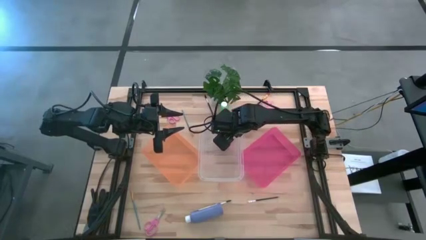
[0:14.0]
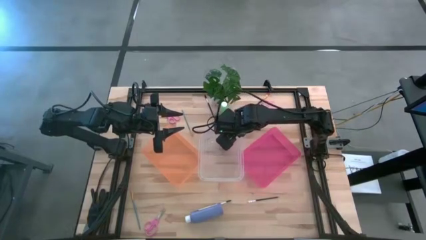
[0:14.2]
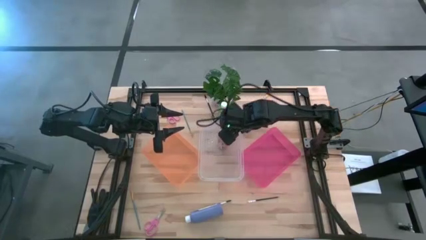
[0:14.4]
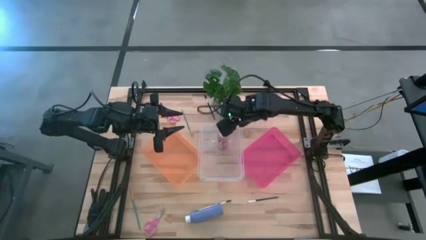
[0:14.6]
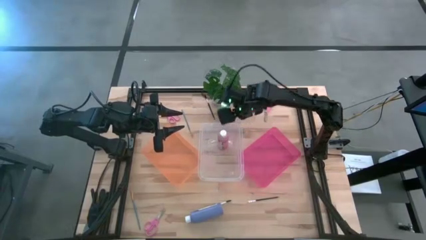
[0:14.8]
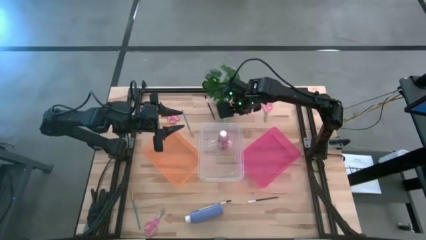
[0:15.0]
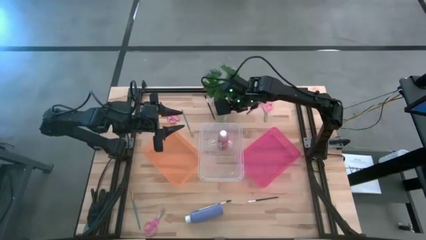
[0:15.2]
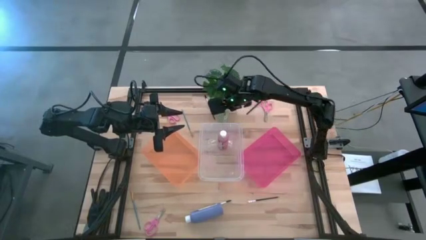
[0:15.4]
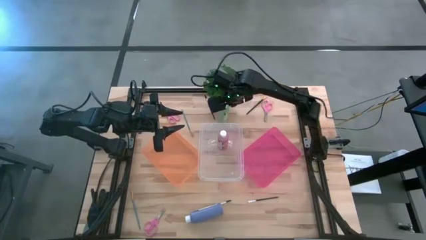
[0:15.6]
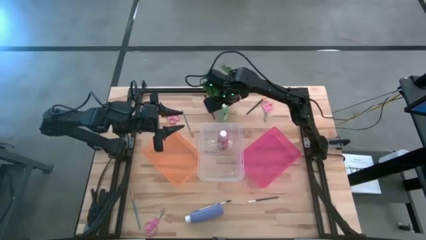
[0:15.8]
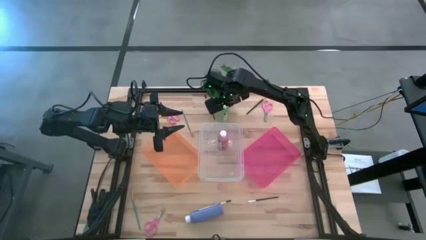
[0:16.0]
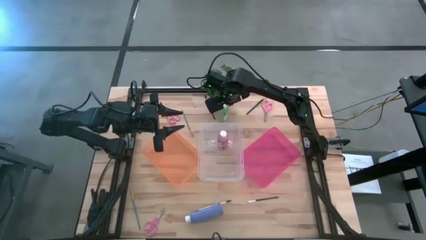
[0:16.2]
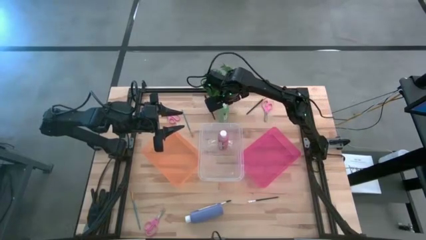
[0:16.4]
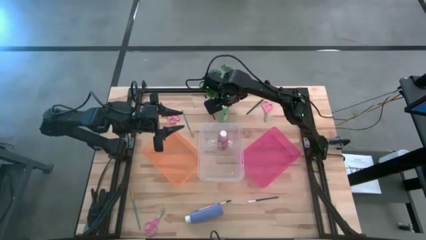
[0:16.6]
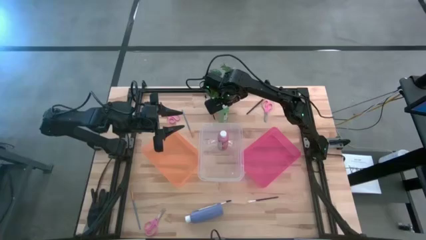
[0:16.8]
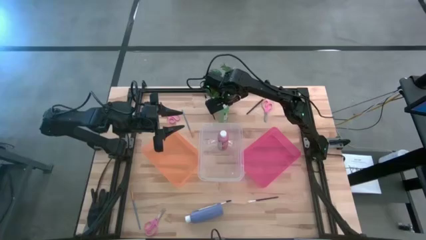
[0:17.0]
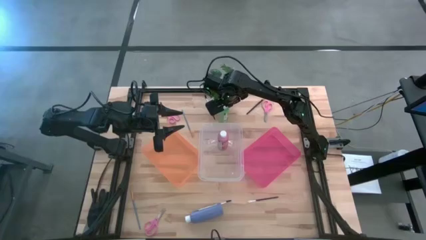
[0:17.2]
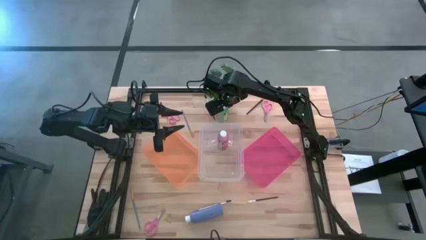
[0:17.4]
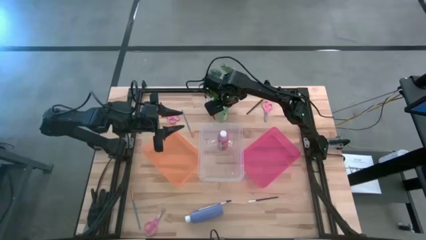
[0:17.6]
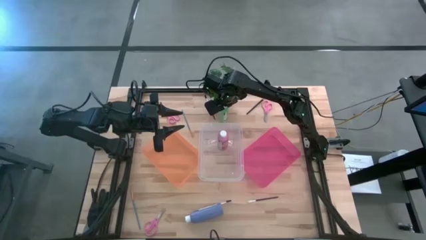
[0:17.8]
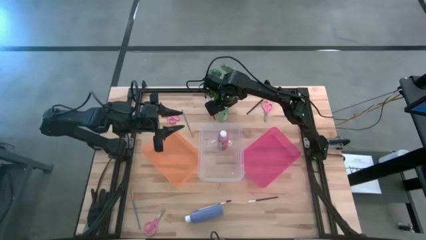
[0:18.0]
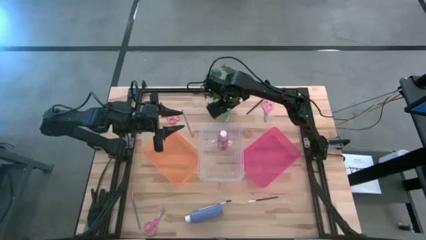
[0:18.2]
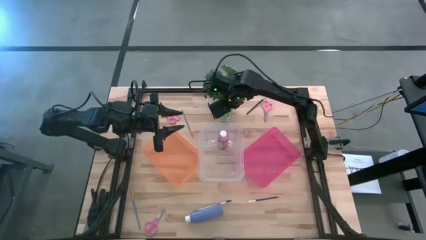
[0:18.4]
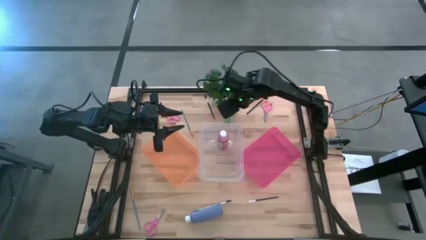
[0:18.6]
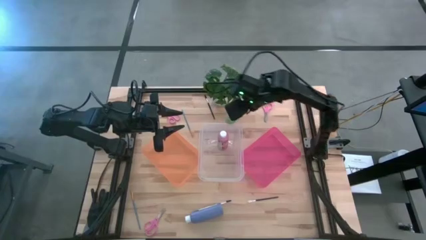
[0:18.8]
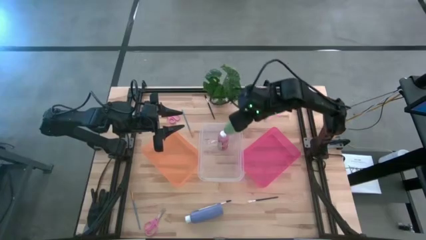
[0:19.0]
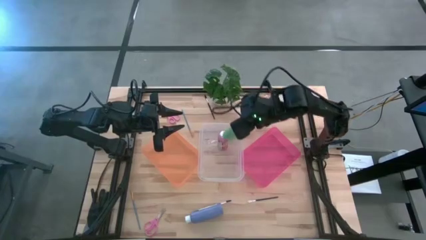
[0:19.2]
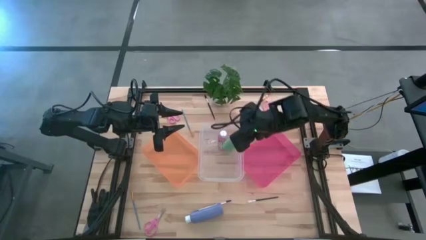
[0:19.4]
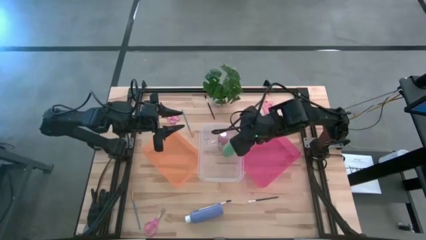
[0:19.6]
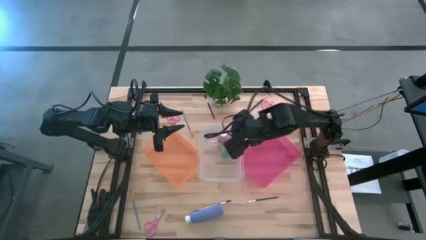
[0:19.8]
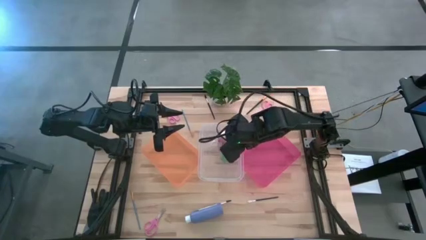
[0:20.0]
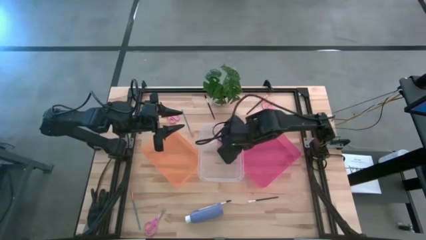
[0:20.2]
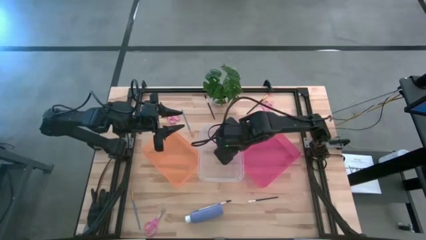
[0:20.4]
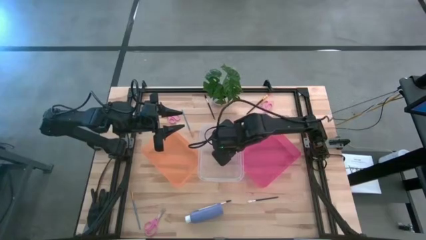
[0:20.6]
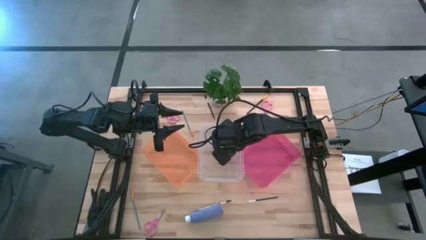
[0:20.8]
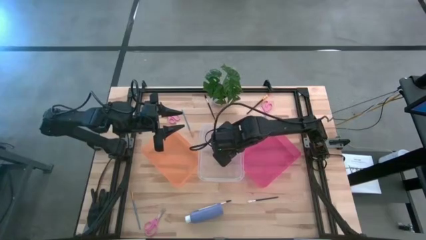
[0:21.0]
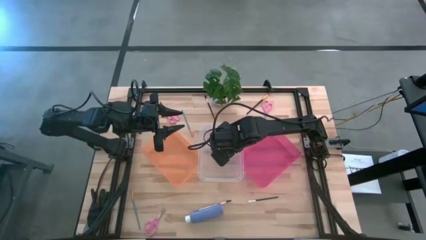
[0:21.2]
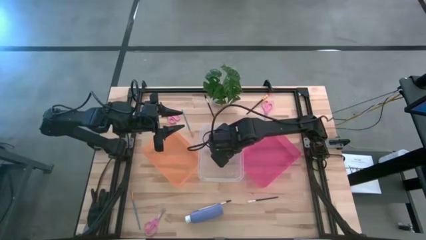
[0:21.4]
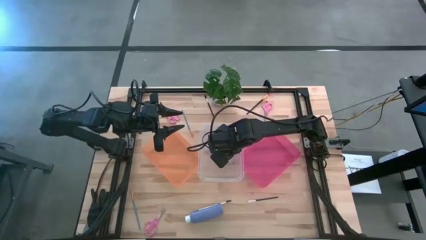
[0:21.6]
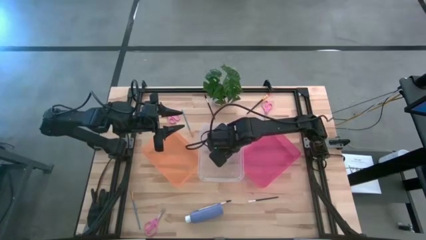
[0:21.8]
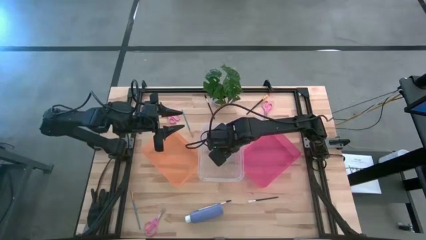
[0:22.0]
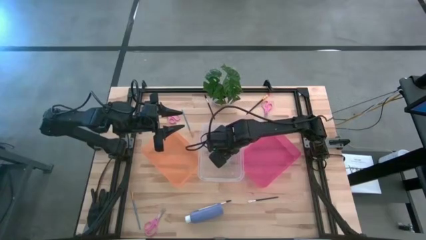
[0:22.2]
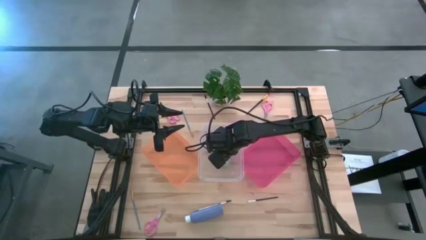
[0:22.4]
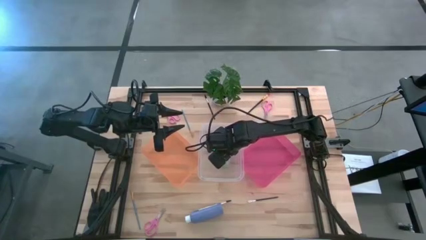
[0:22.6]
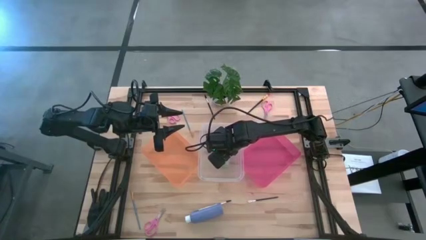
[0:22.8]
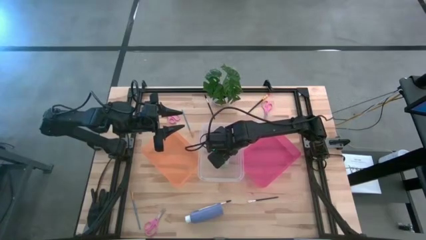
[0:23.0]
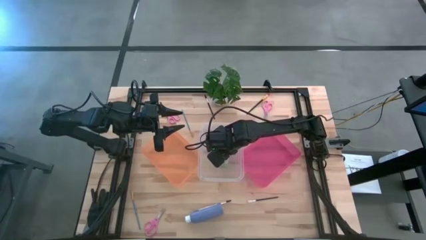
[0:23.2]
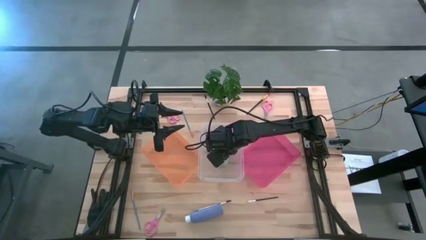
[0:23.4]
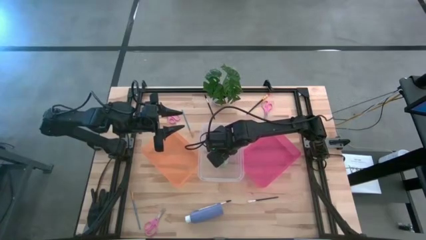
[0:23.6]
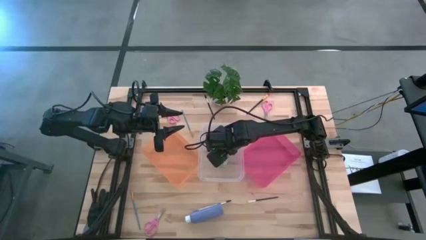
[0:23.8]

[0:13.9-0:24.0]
Task: Pick & Place Paint Supplies
Put the green paint bottle into the transparent bin

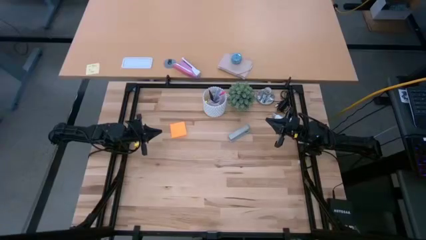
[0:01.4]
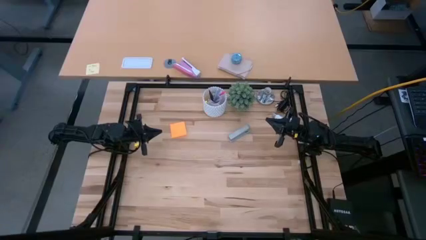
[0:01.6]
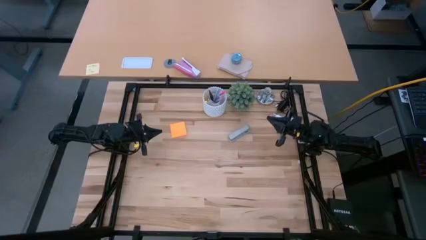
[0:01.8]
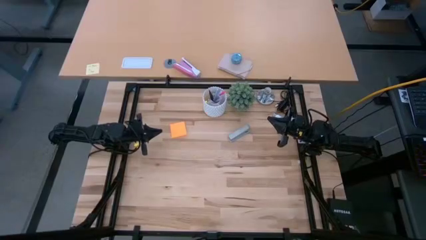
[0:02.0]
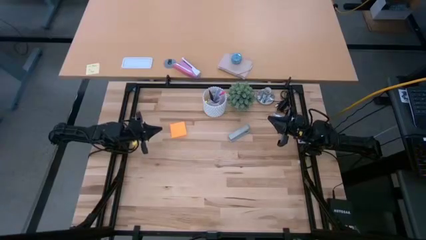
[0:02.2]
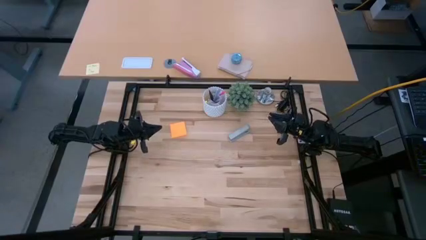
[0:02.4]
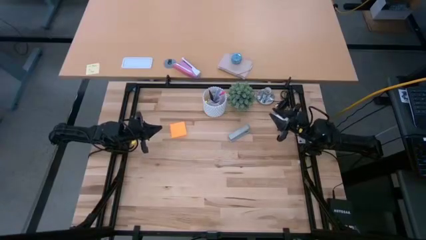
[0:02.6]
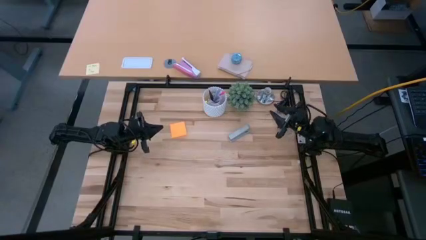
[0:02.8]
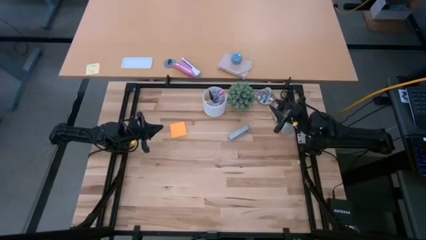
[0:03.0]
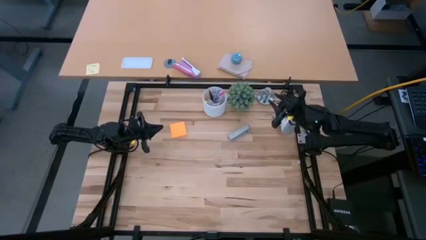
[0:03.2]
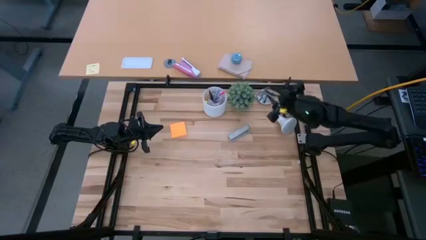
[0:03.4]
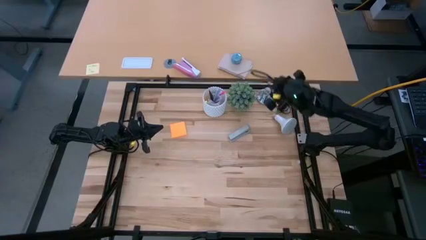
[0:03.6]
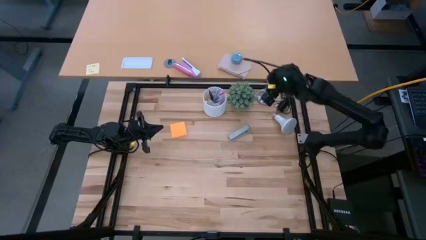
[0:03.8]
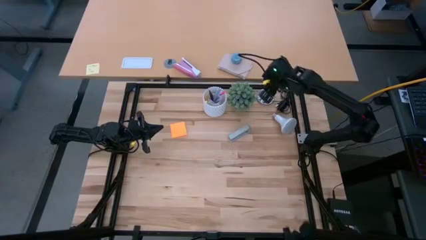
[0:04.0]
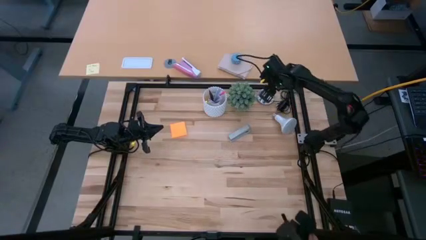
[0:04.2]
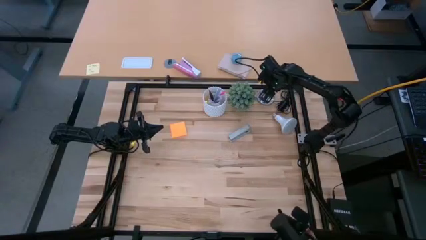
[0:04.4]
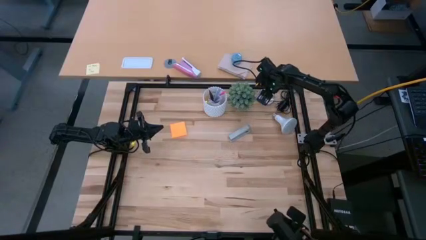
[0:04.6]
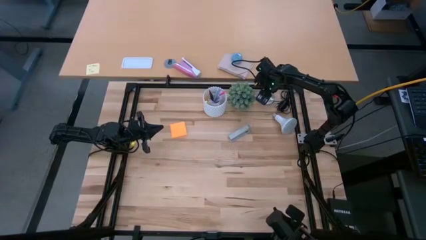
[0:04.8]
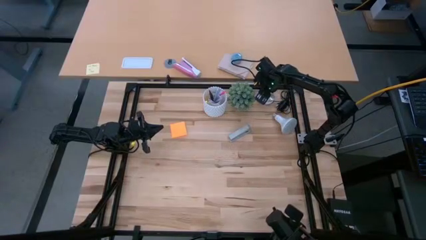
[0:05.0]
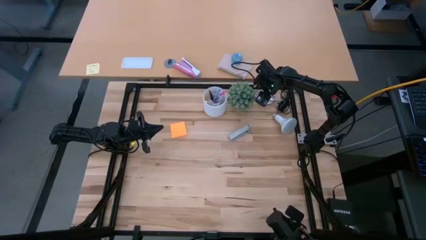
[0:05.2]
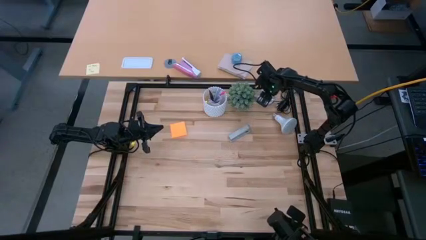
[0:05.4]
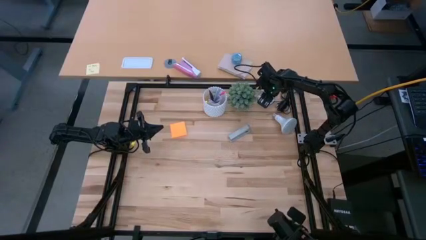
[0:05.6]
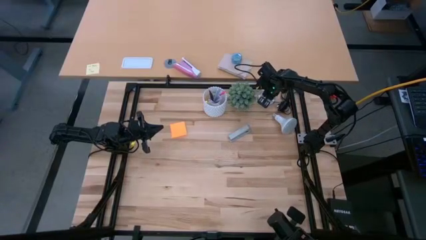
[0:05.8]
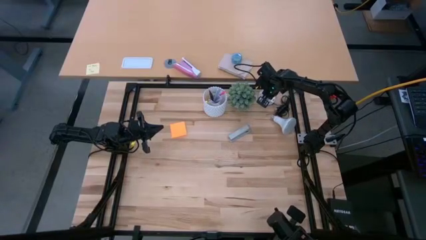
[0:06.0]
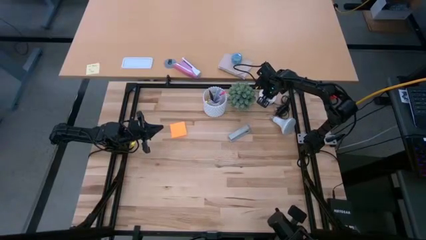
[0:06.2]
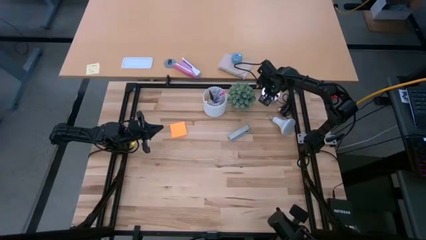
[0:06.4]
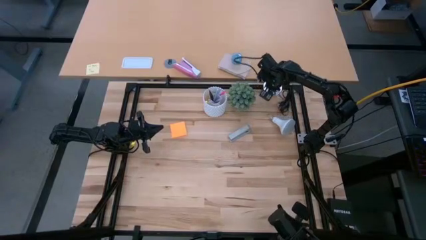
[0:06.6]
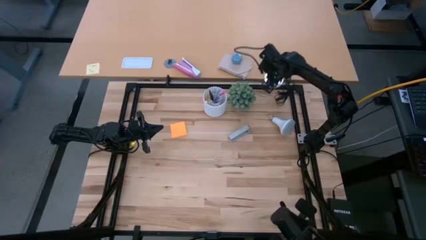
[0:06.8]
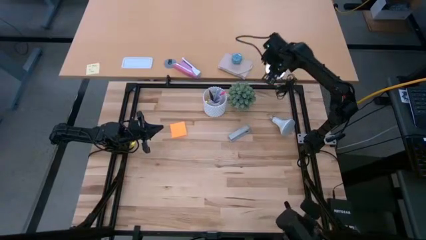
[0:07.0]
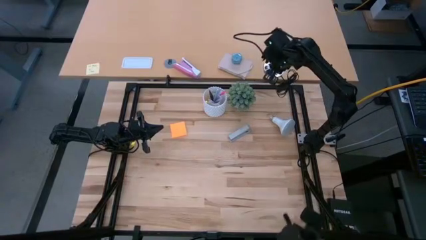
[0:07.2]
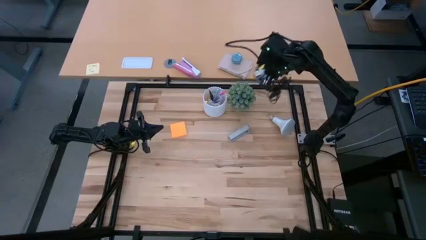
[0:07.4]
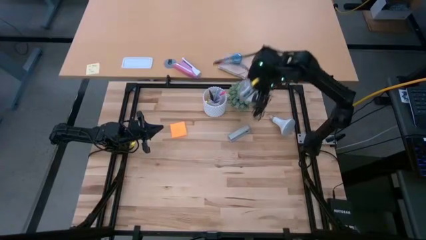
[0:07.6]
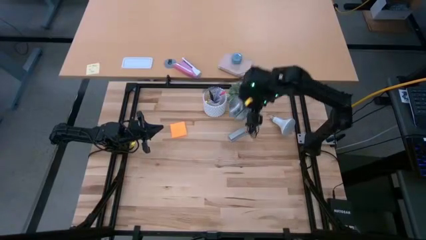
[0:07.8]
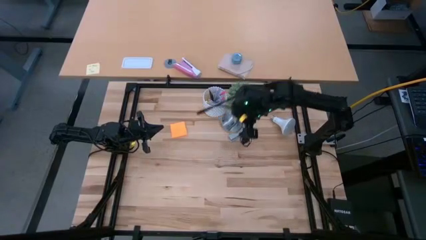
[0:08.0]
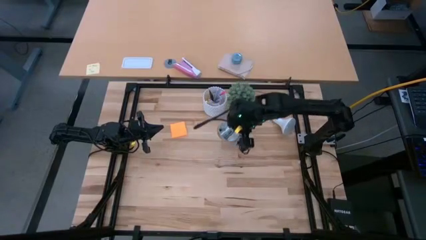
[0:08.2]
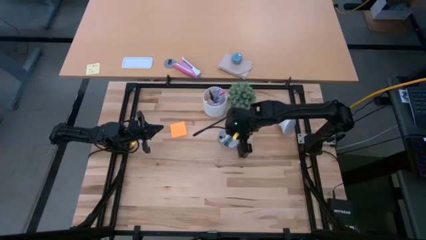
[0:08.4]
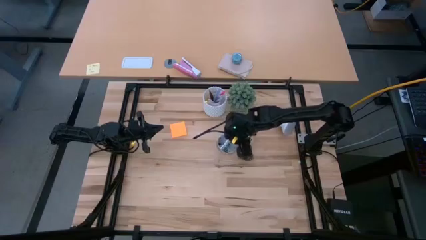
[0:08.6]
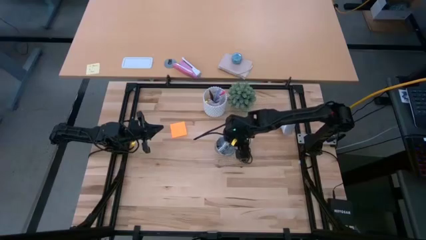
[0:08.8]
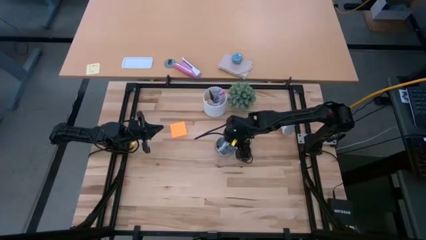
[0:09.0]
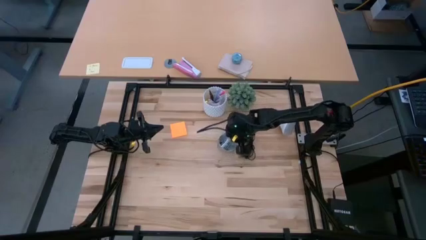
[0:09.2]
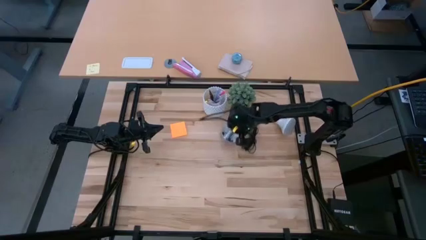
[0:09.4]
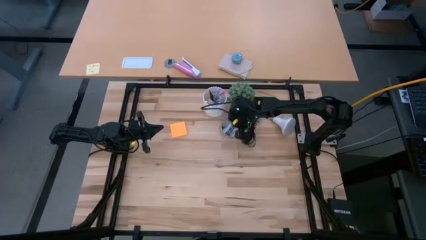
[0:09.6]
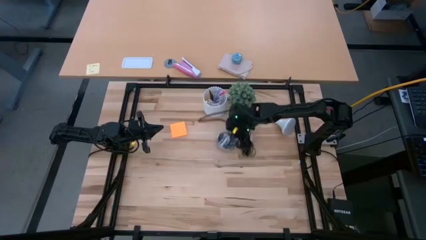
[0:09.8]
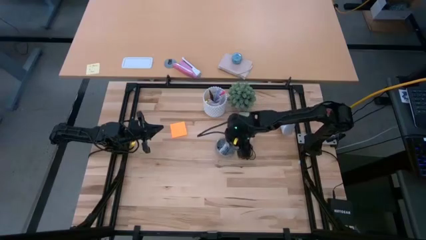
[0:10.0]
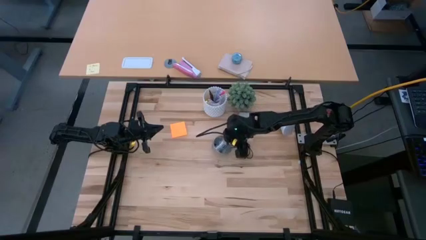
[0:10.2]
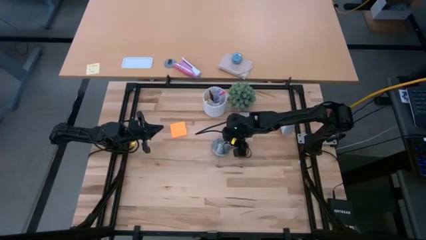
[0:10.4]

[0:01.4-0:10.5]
Task: Screw lightbulb
Move the lamp socket to the center of the table
